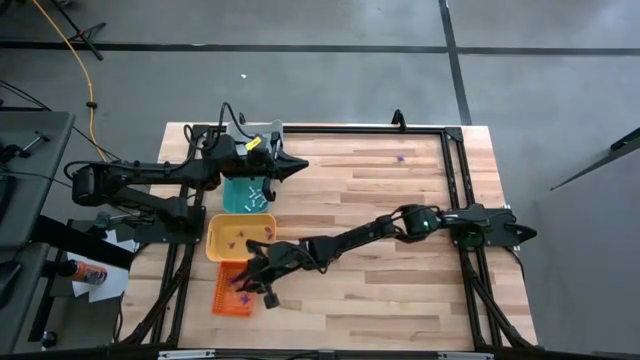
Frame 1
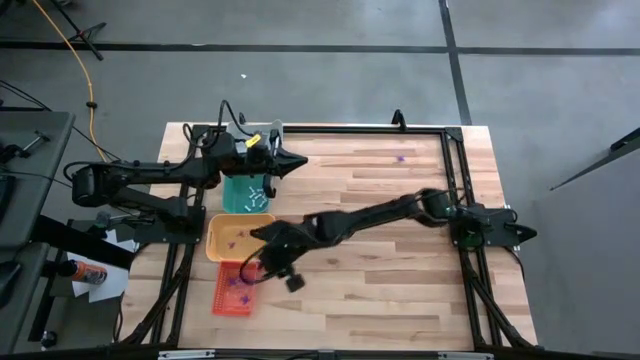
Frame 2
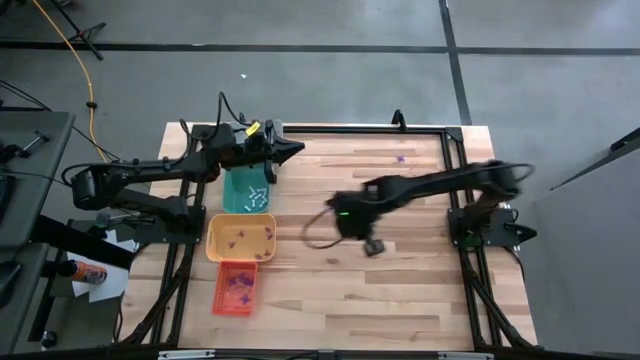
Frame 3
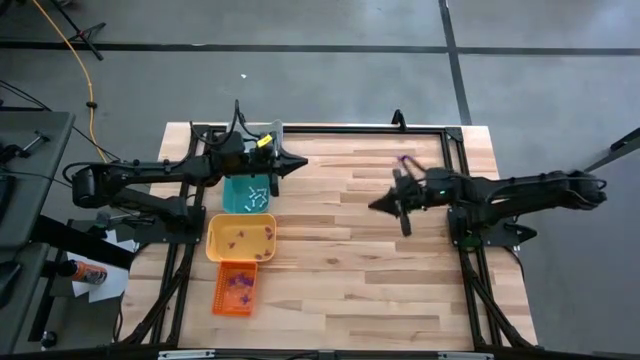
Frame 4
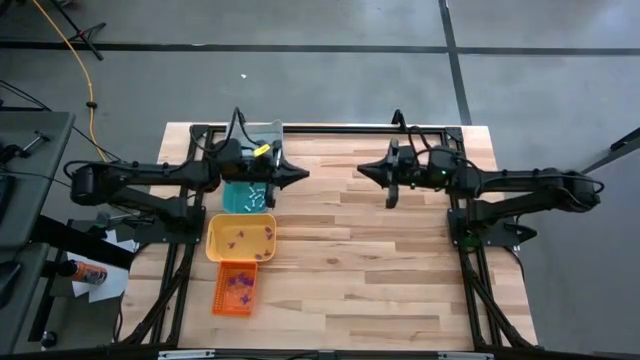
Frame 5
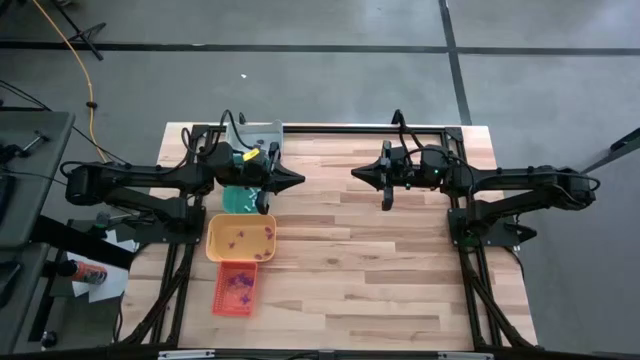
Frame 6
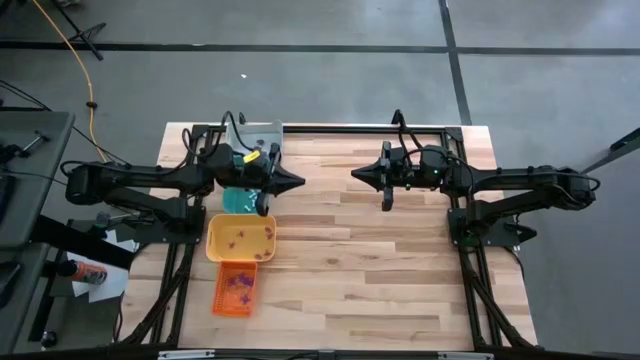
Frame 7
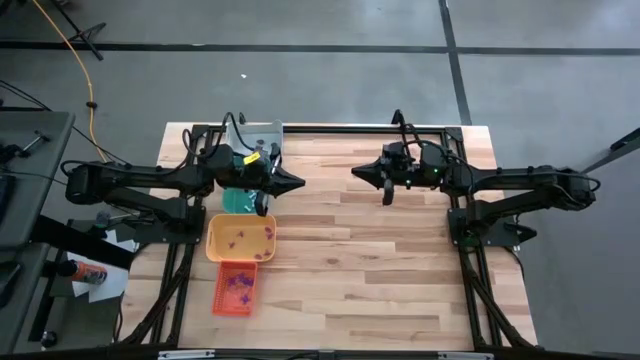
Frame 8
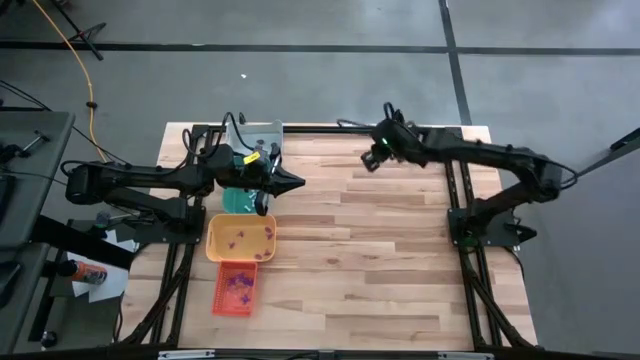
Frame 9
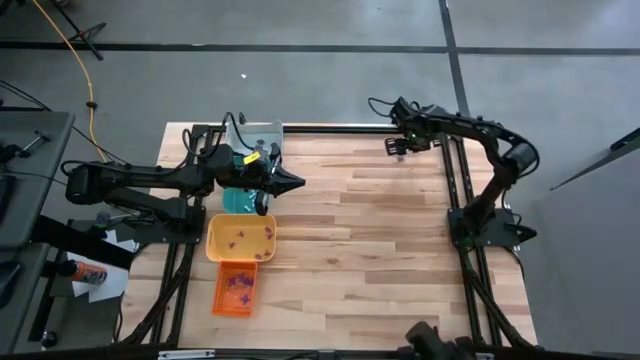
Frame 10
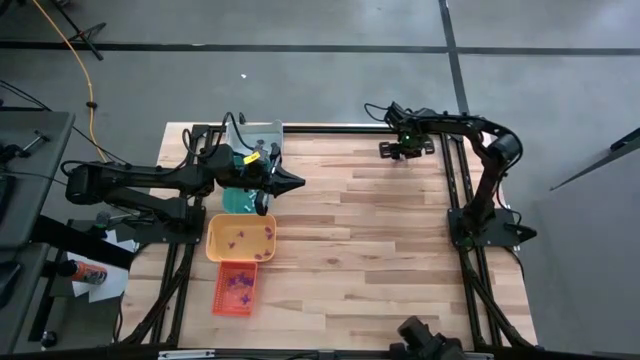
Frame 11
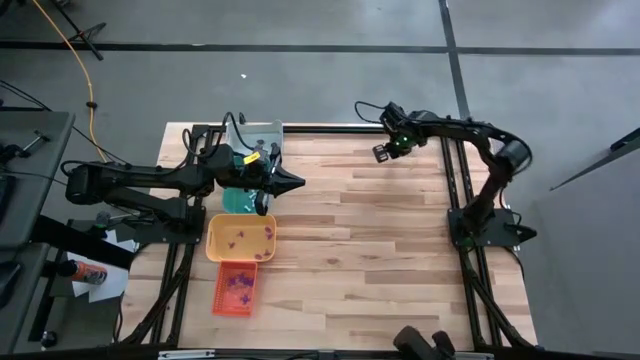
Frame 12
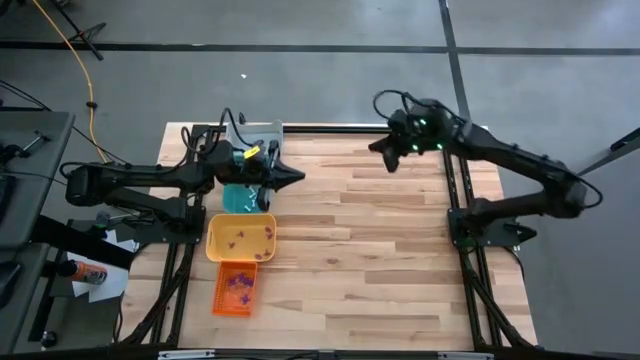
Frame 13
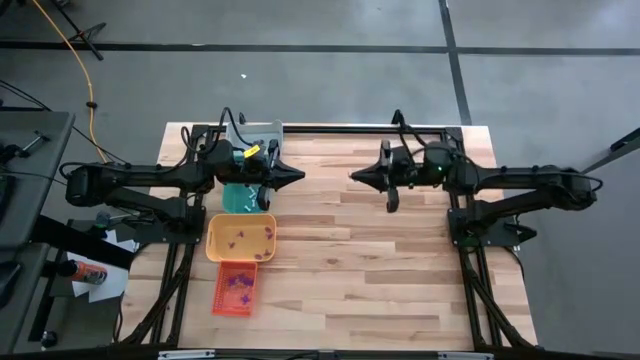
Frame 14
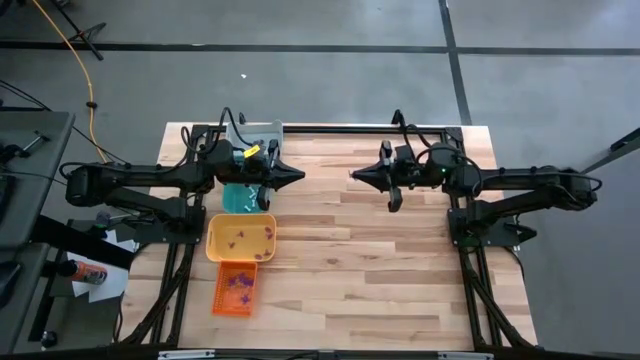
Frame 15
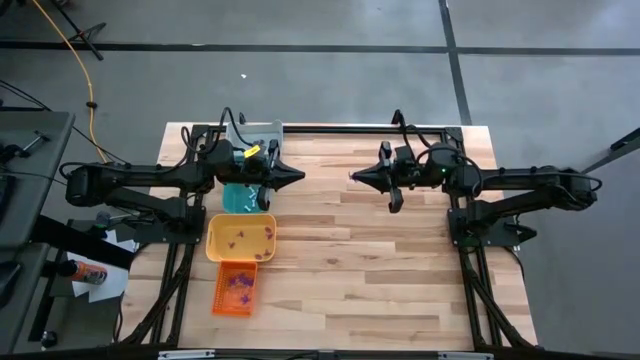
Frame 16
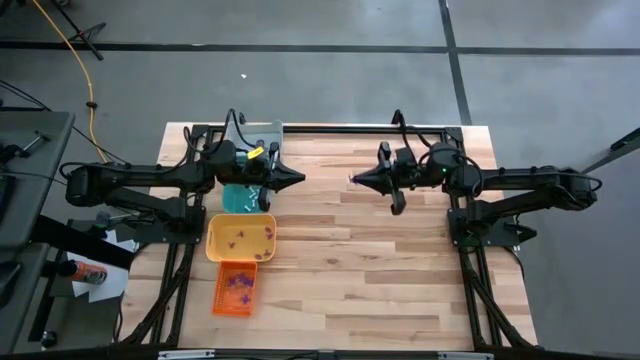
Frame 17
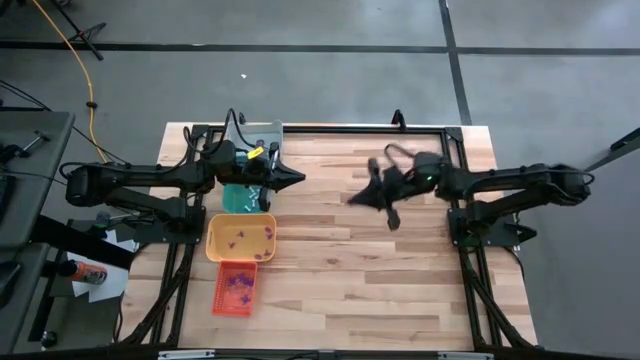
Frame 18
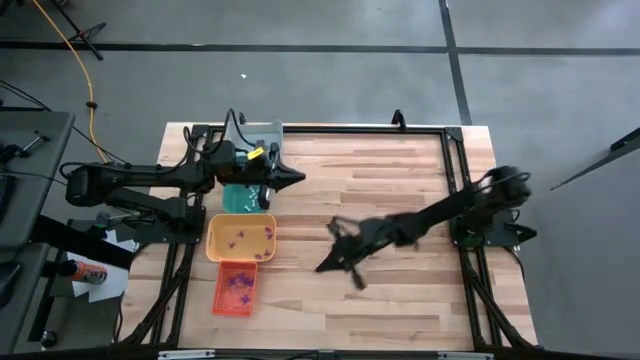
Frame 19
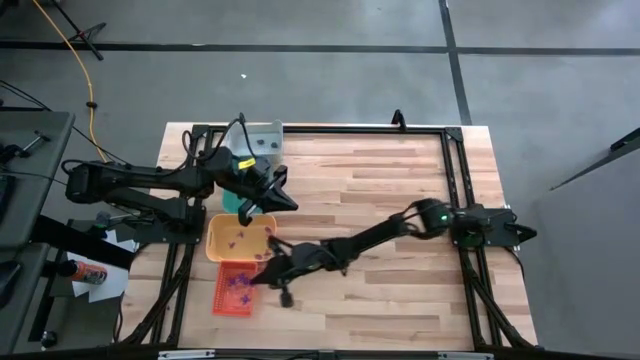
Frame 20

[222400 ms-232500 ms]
Task: Sort Halloween decoration
Put the purple spider toy in the orange bin

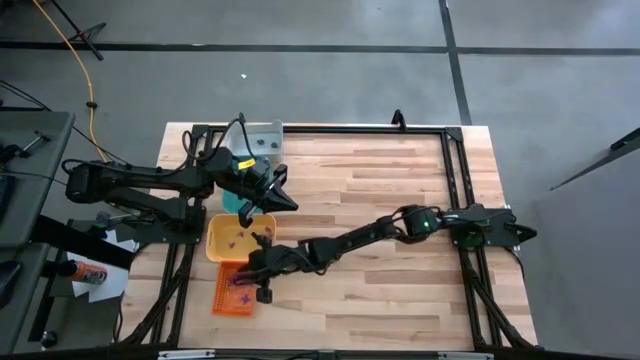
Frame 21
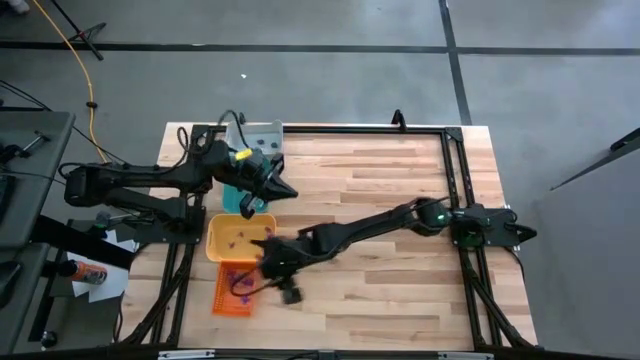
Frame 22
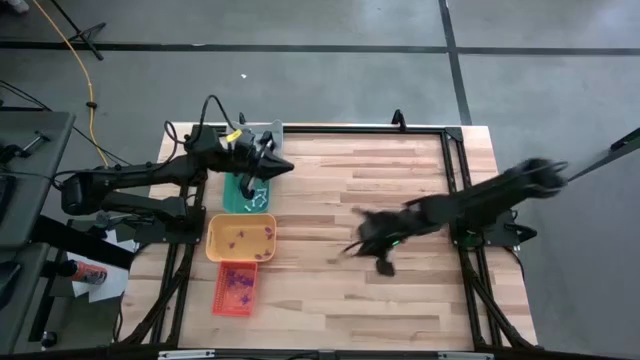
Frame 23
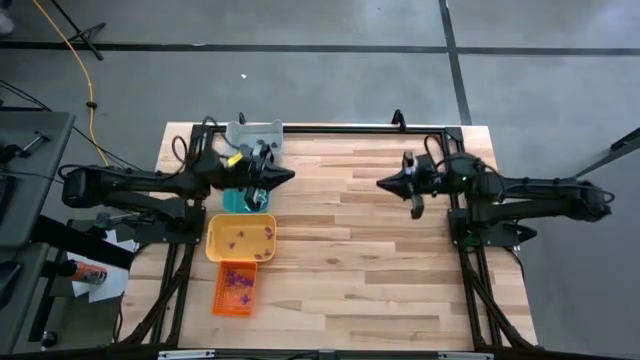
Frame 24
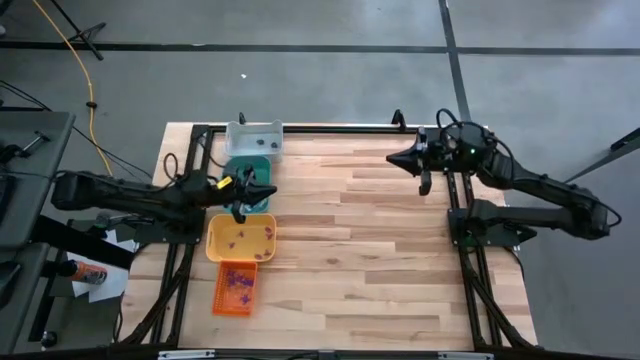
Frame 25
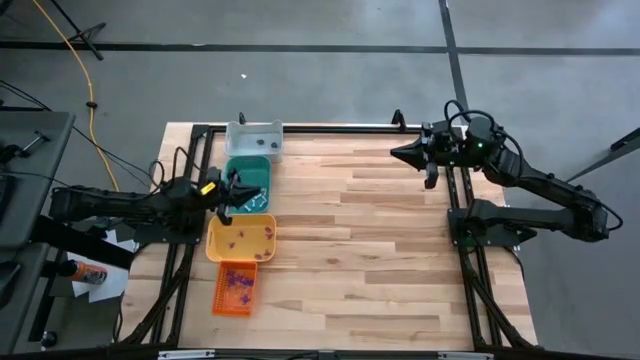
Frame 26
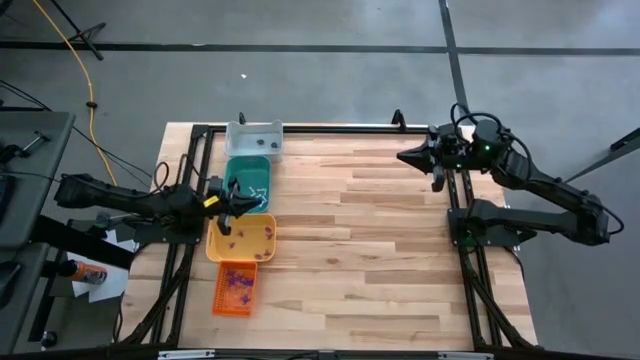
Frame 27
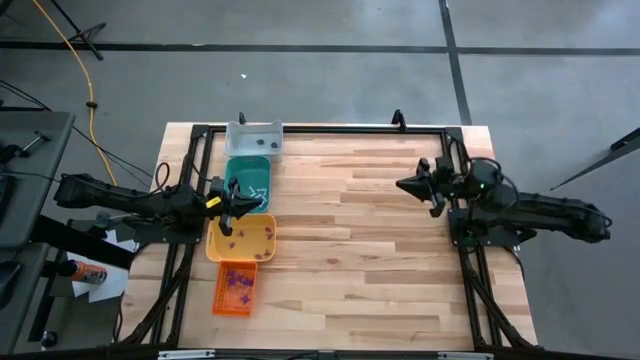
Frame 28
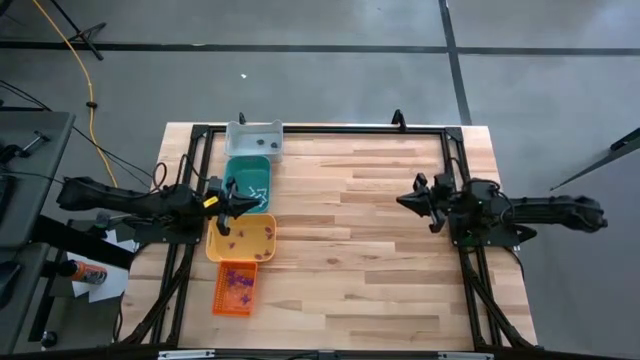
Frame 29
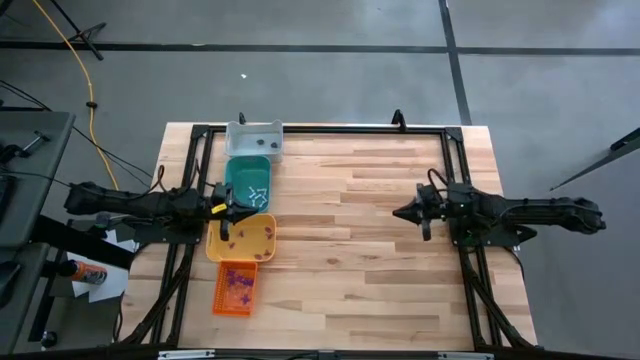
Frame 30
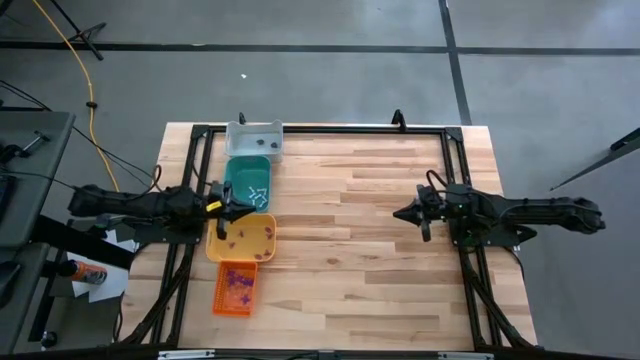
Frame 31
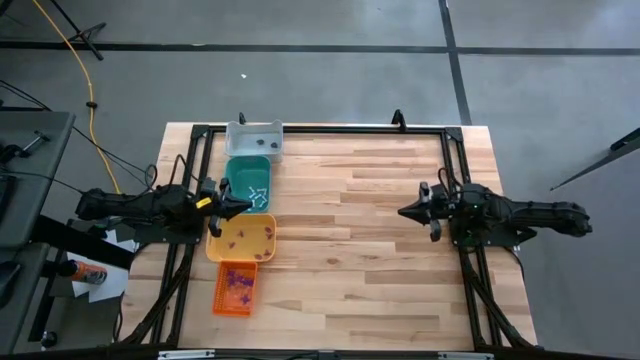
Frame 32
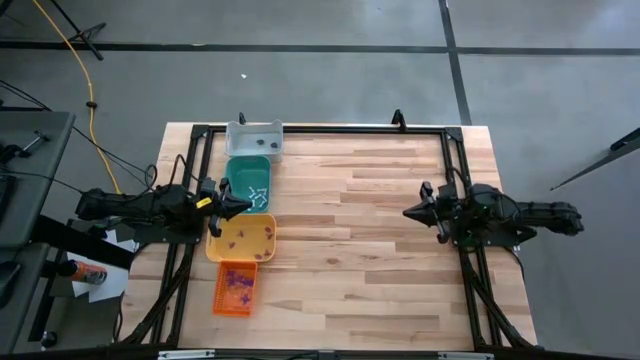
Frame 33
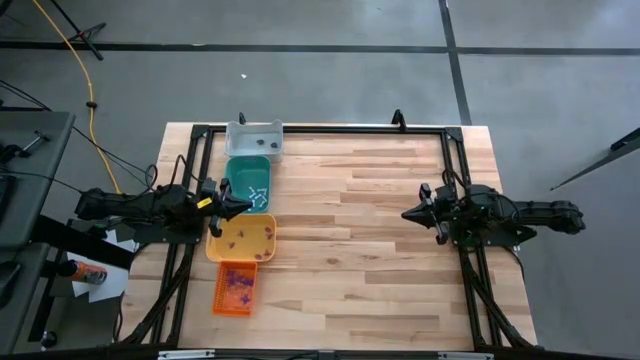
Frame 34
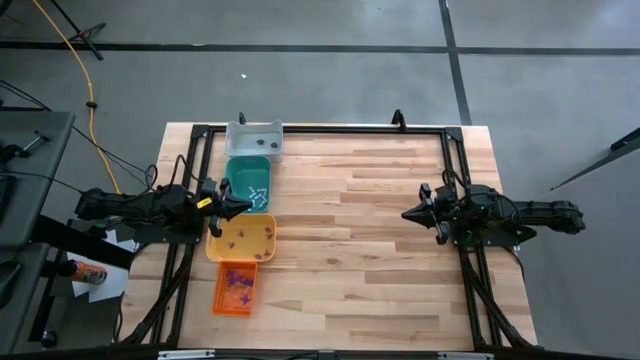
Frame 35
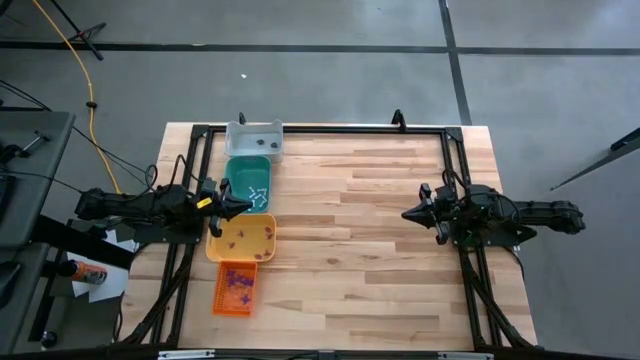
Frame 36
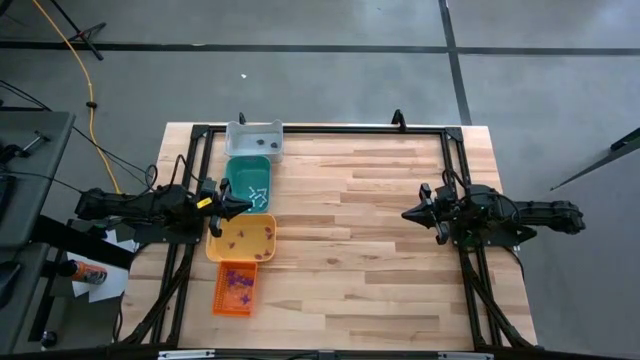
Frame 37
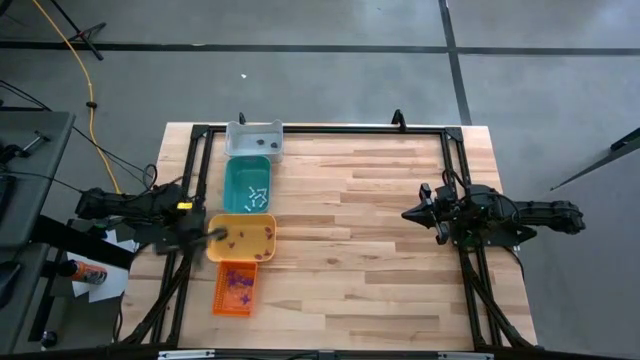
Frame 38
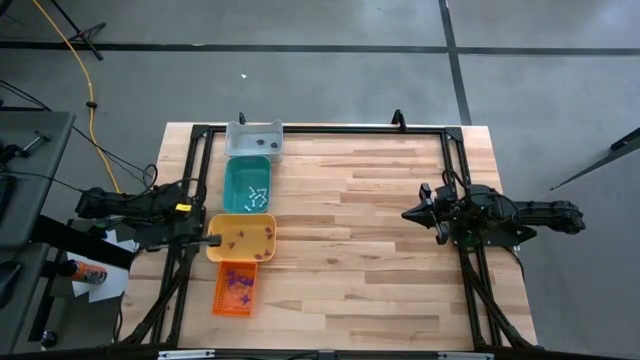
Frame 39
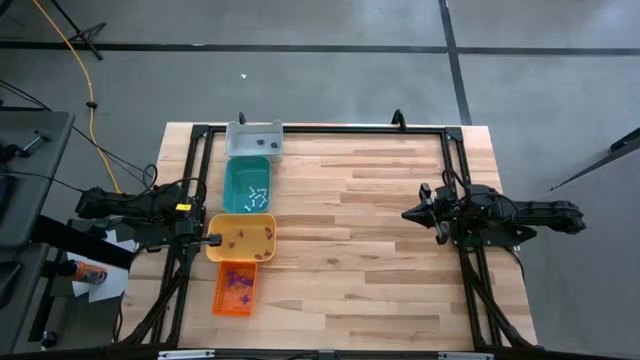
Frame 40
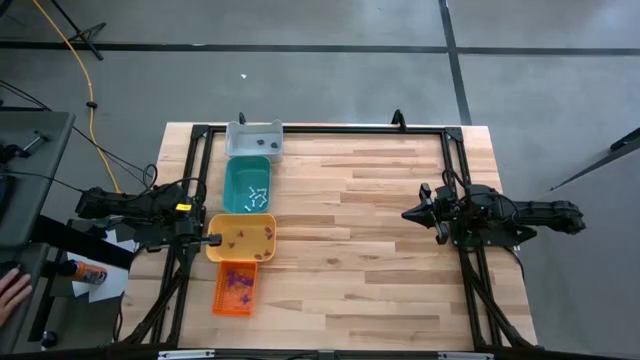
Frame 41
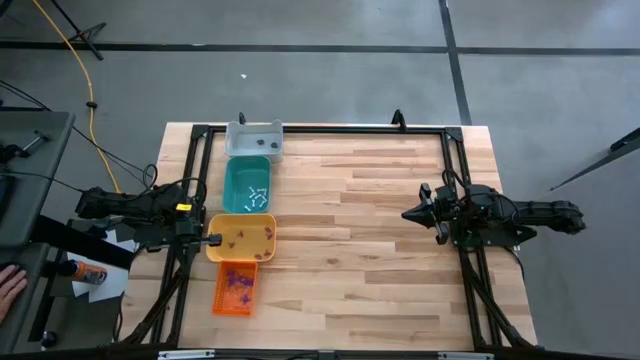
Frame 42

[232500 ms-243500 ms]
Return to Home Position
